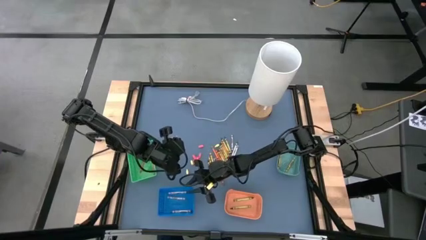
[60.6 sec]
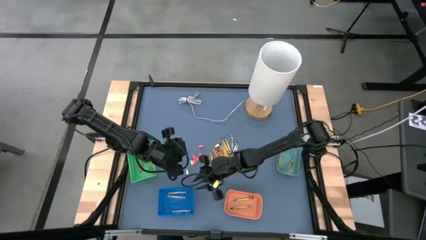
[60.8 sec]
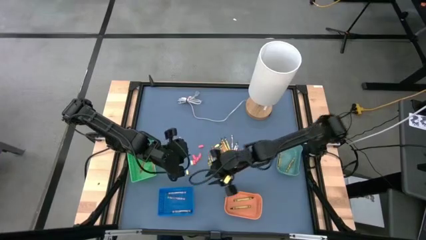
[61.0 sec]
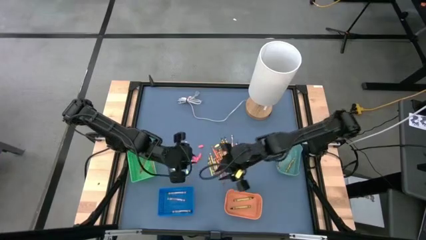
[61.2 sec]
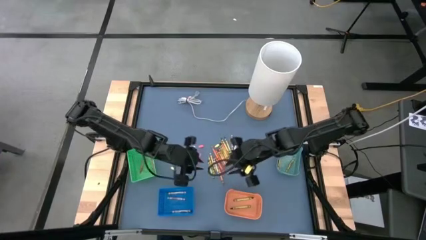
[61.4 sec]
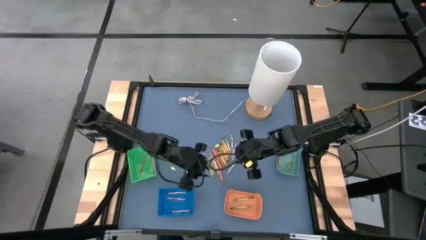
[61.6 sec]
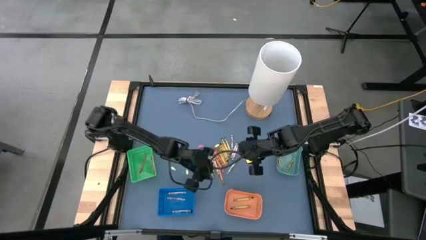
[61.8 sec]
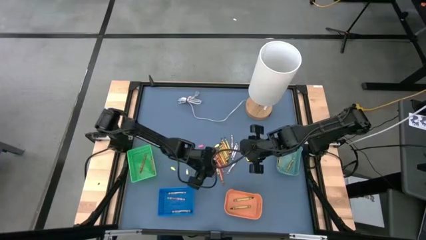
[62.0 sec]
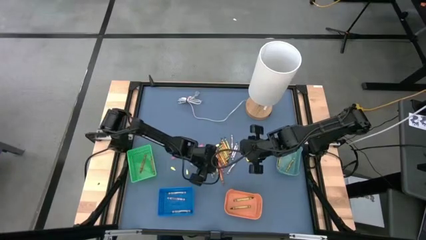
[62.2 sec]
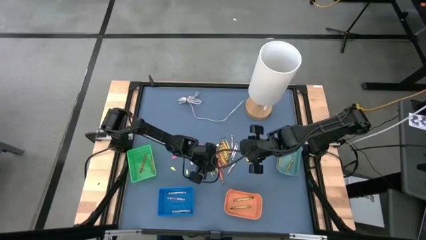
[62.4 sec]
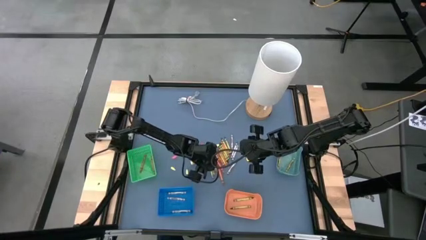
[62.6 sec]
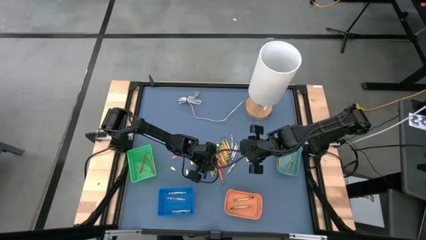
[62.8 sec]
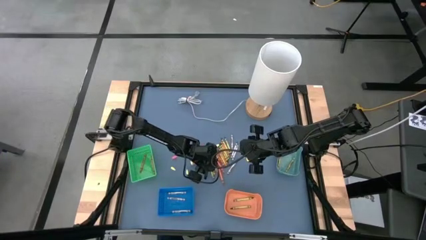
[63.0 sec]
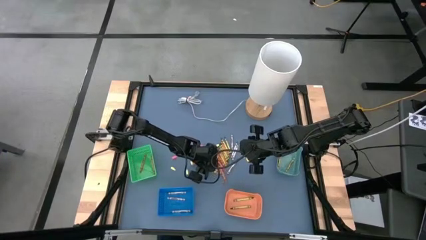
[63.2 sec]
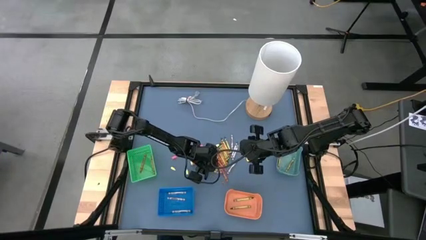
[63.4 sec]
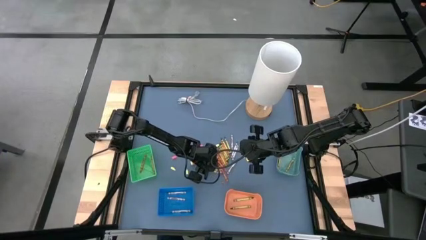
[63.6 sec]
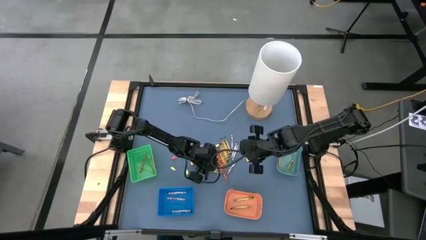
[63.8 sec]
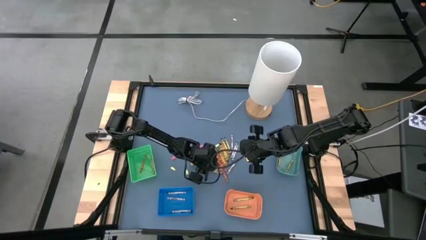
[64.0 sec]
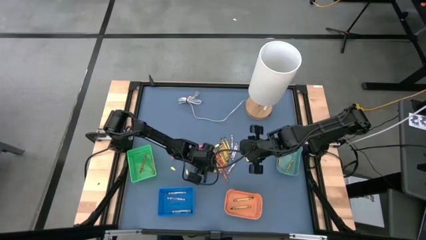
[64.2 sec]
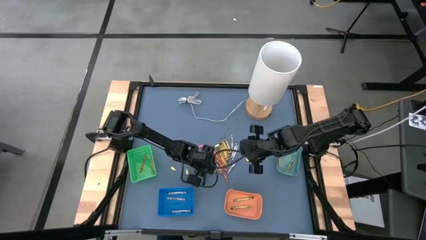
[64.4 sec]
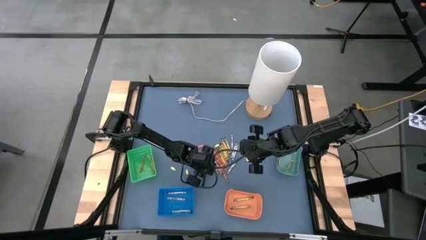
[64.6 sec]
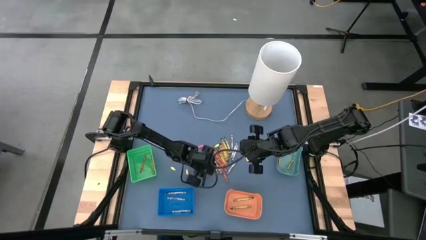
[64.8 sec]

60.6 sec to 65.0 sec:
Task: Sort crayons
Put the green crayon into the orange bin

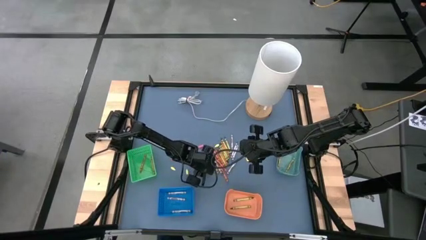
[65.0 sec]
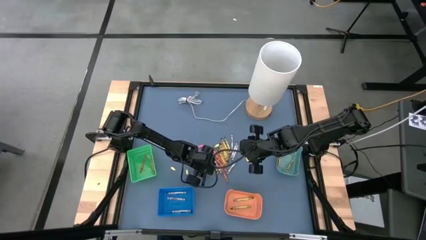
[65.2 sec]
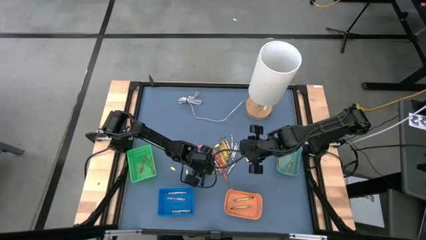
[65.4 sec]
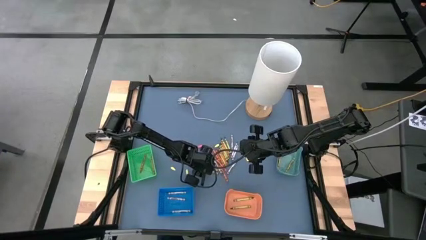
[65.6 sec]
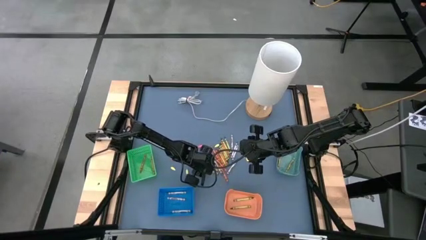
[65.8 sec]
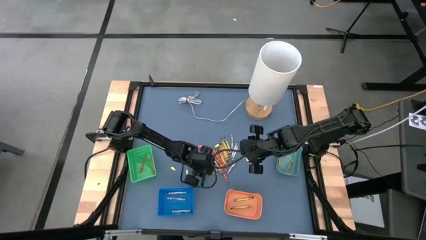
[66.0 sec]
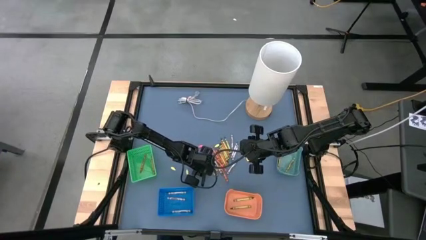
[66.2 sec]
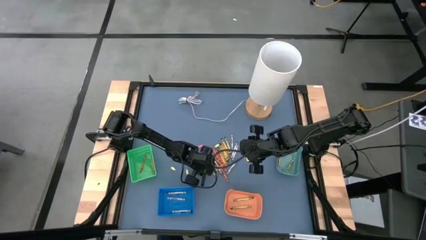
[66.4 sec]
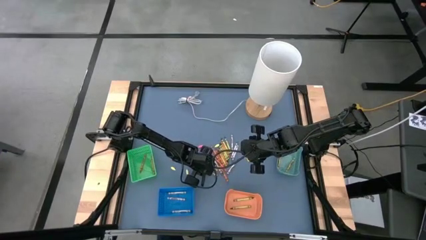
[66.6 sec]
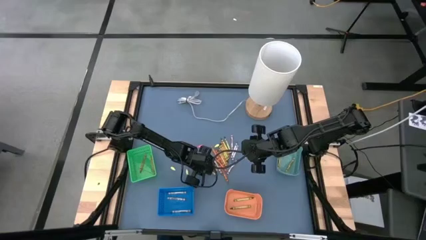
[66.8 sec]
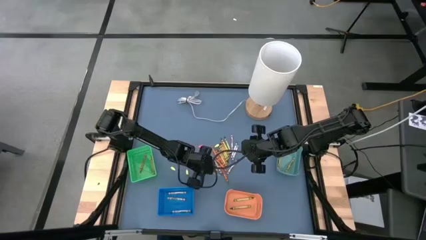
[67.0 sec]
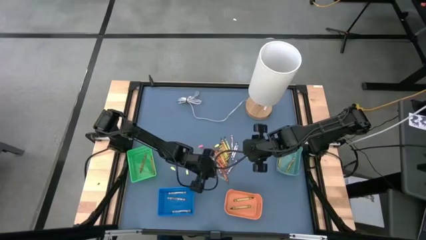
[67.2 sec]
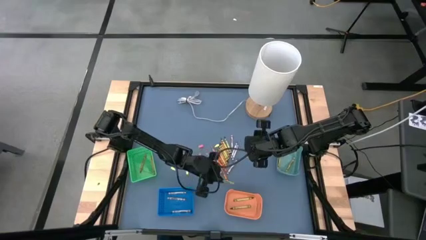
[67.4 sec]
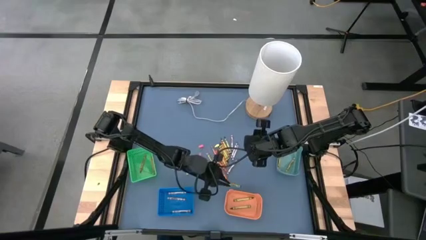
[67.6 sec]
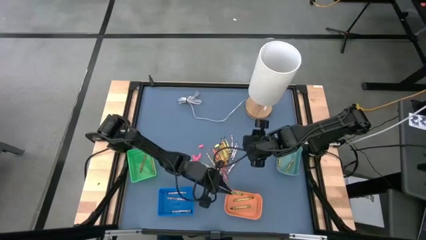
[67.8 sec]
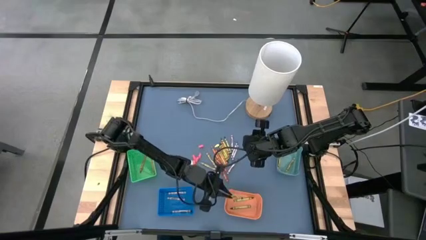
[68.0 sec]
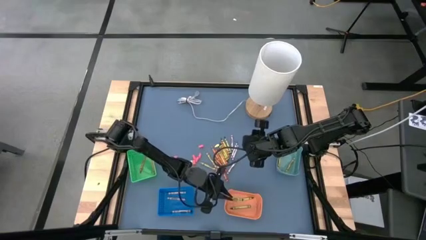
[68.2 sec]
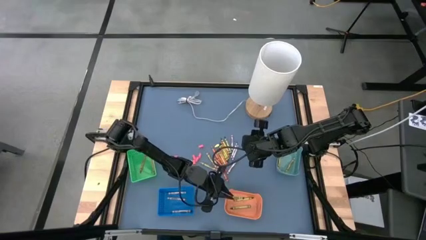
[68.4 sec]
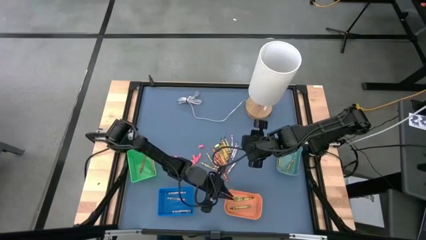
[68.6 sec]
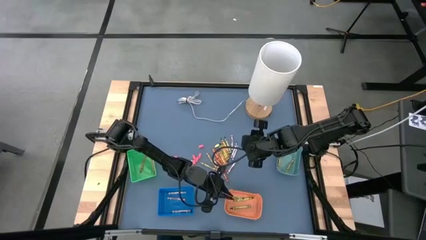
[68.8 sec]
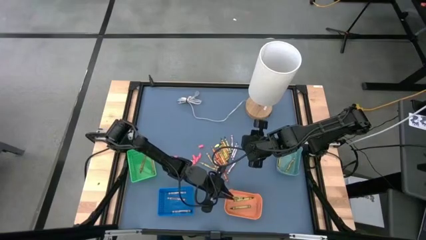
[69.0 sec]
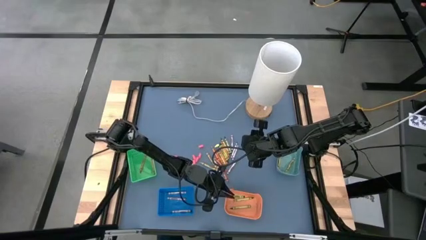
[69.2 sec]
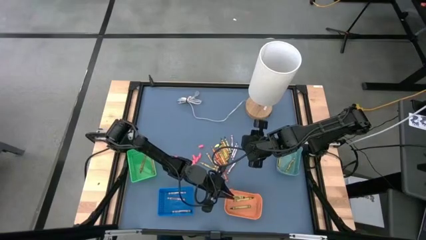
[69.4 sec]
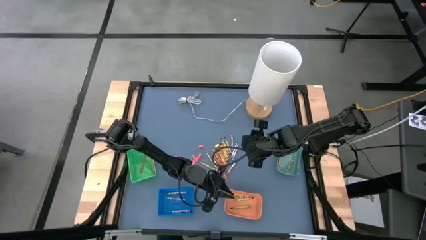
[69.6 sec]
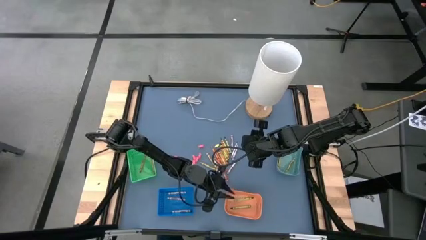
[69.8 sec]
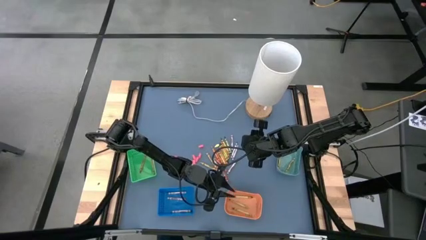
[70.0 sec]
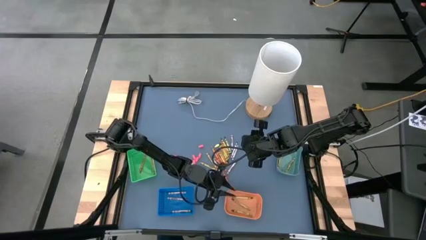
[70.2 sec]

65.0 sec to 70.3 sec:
Put the green crayon into the orange bin

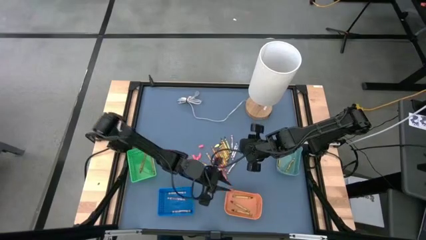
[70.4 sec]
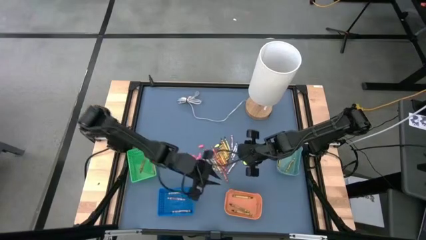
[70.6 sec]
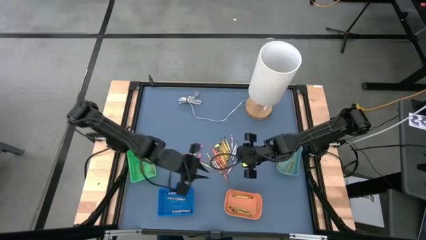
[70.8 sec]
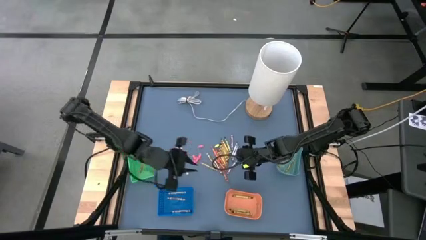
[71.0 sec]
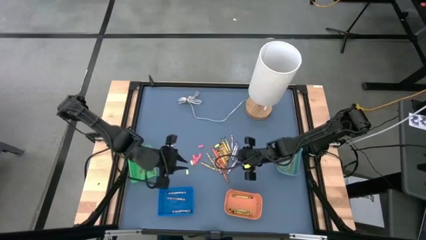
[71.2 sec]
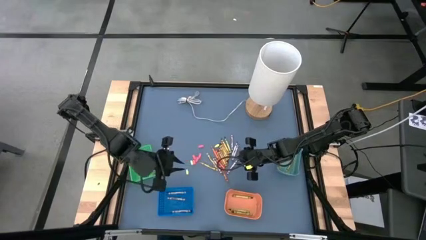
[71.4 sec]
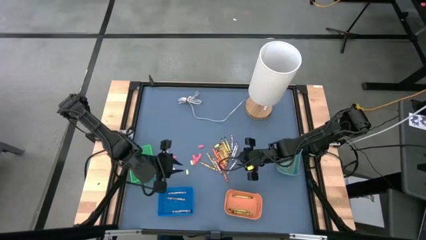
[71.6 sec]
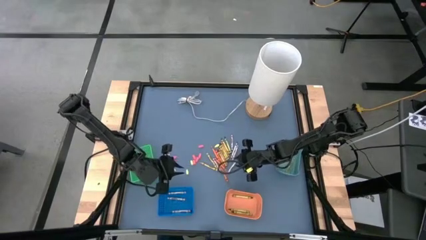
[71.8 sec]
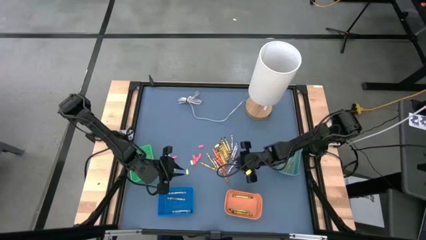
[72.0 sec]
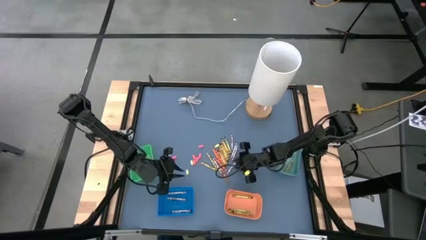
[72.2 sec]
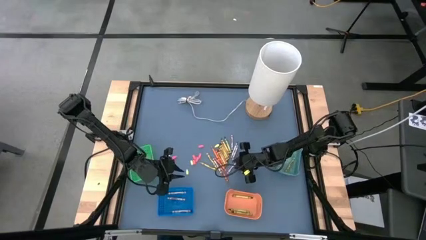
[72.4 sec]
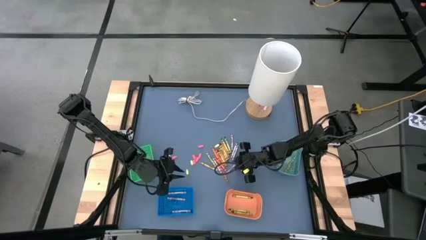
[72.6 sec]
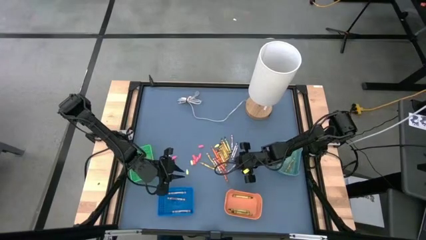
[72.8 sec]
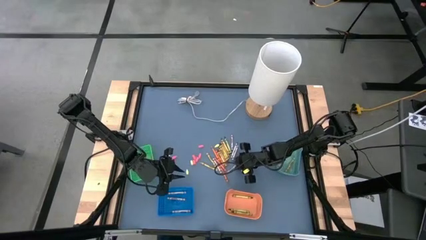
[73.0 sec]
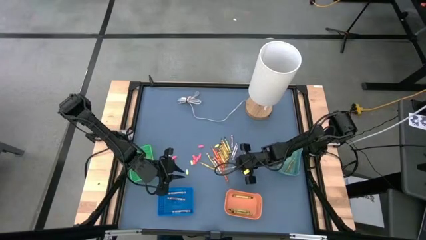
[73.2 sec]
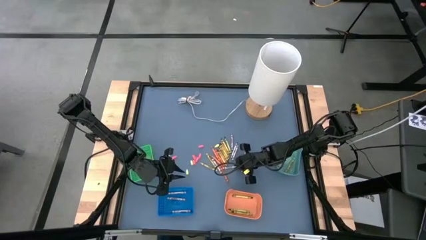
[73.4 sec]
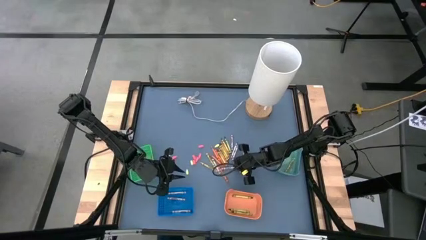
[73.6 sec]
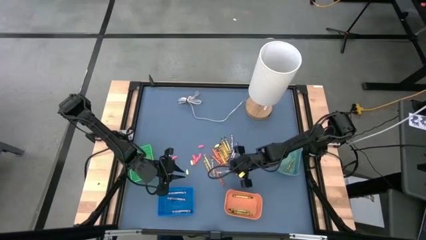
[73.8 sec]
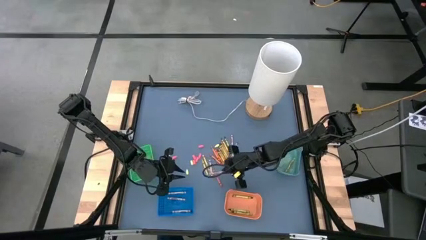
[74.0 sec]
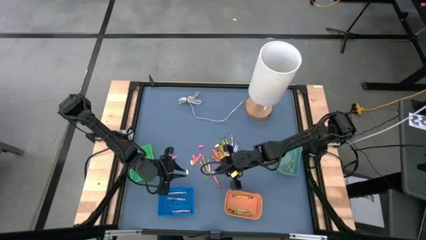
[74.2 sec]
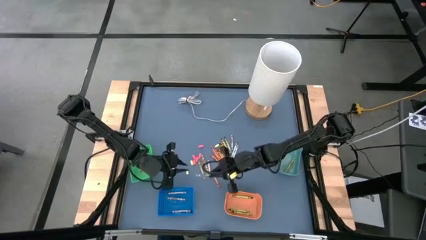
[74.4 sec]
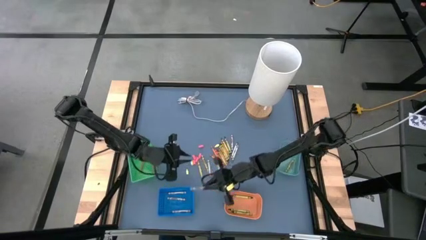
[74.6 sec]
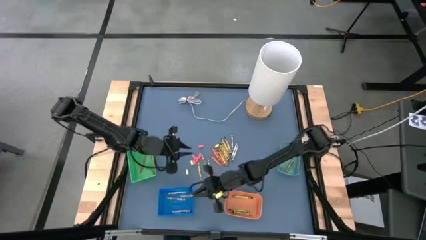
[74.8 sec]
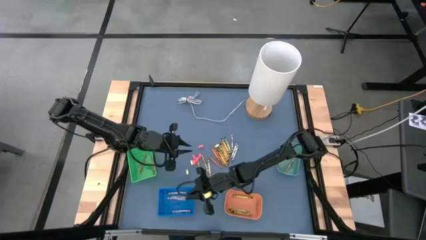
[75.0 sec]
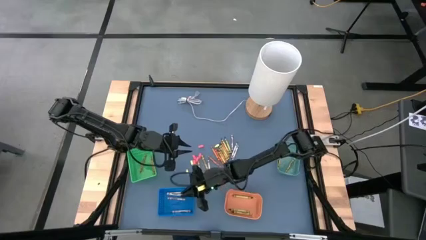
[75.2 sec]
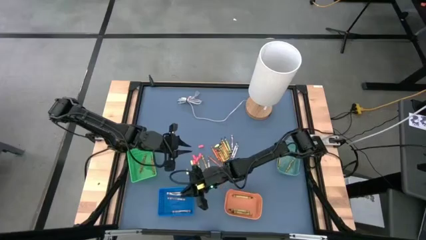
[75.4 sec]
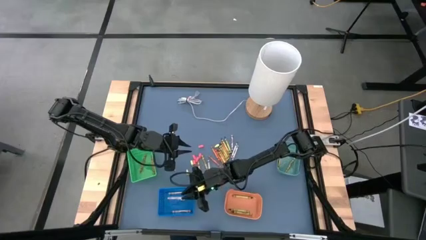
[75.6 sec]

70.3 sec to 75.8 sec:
Put the gray crayons into the blue bin
